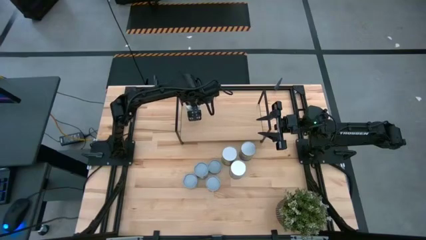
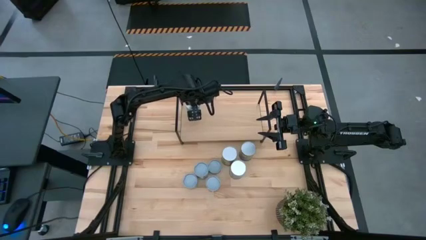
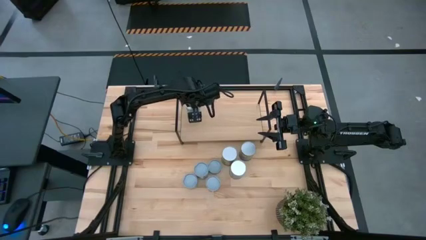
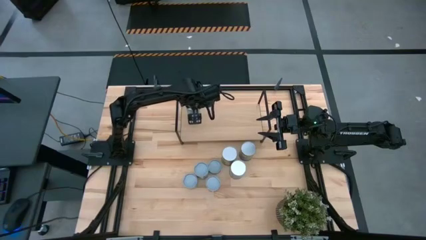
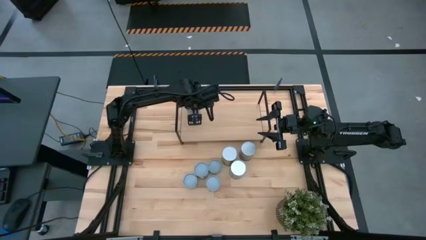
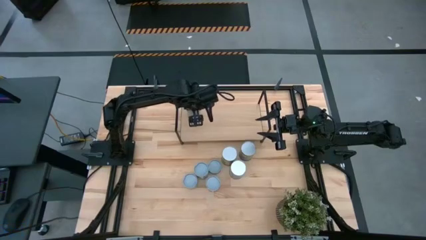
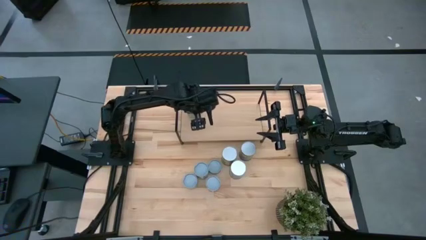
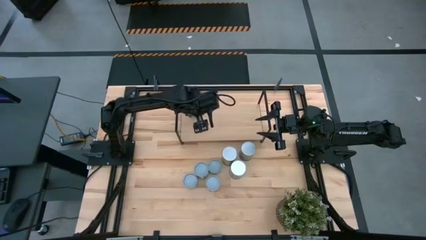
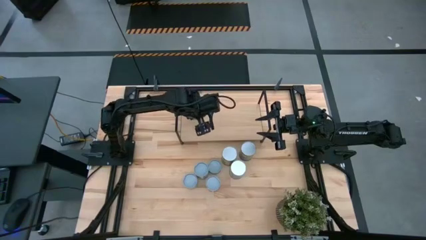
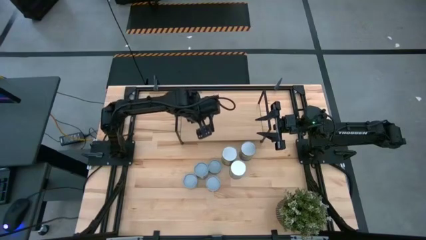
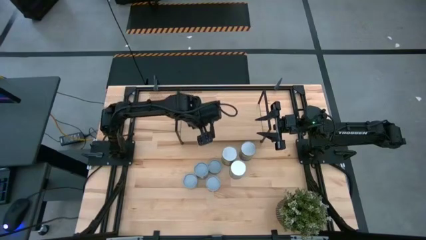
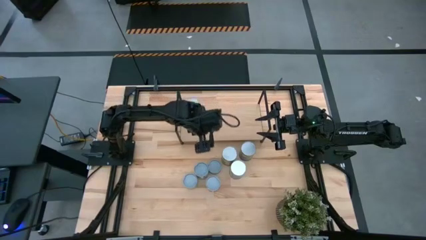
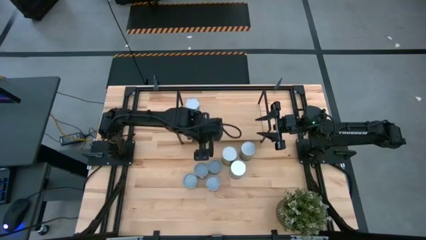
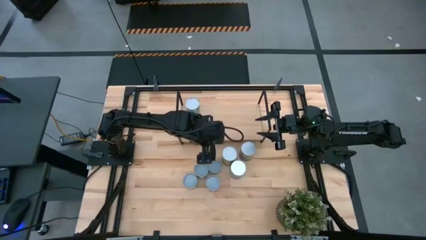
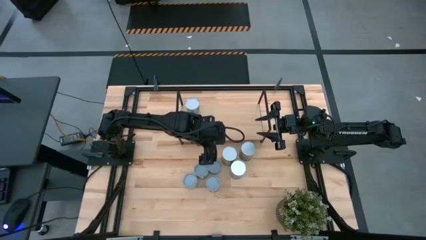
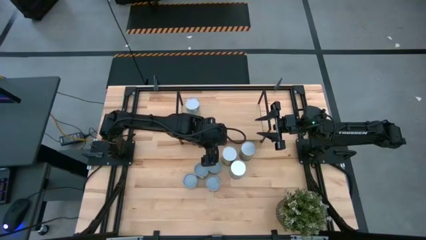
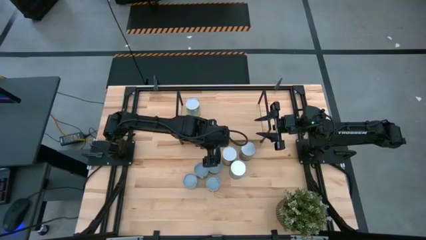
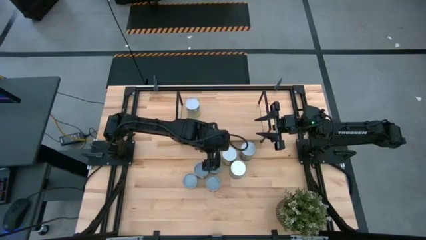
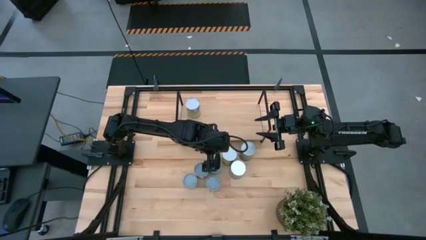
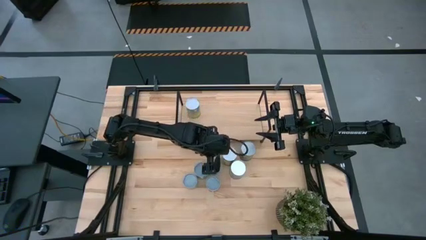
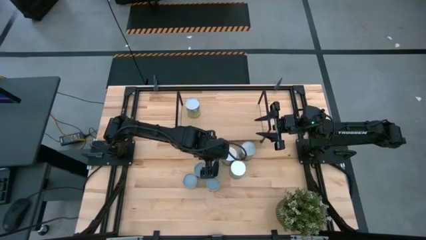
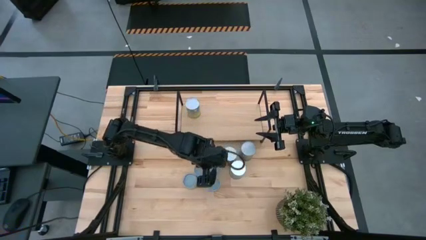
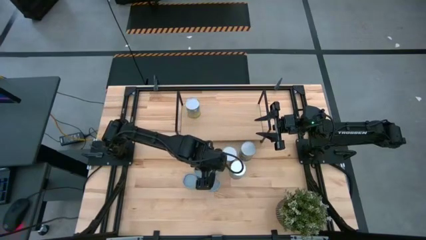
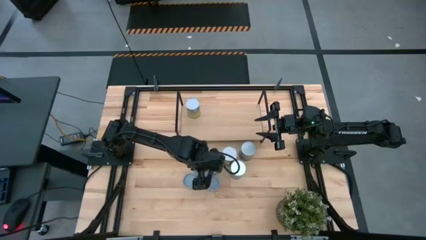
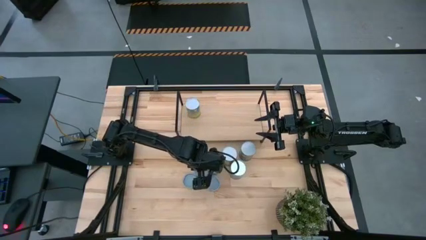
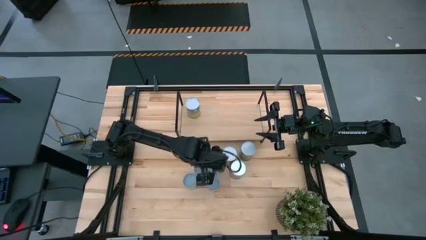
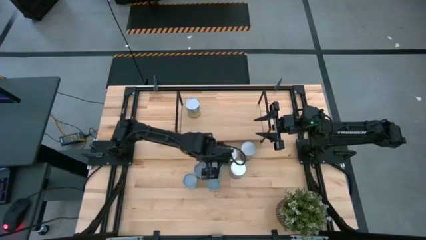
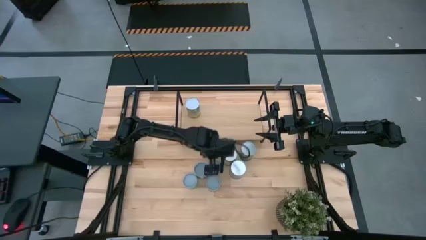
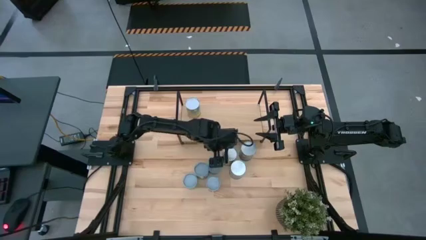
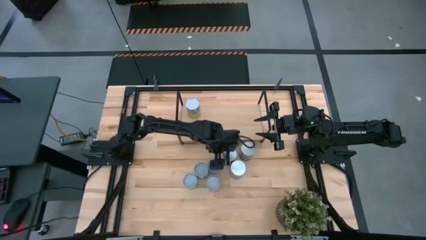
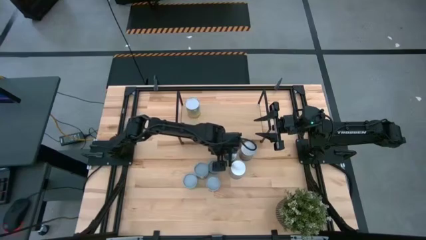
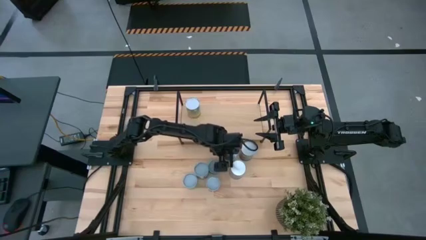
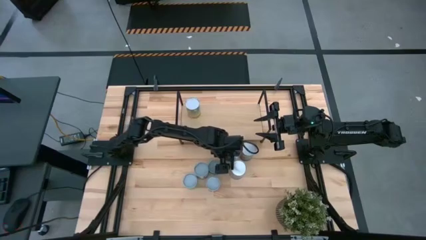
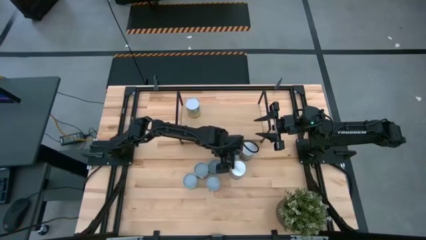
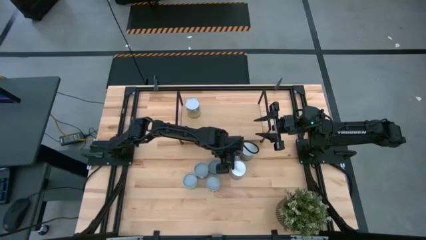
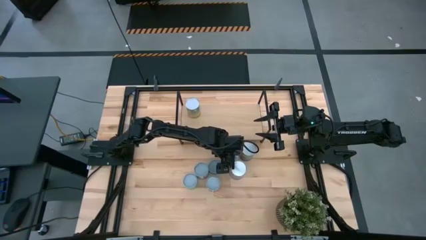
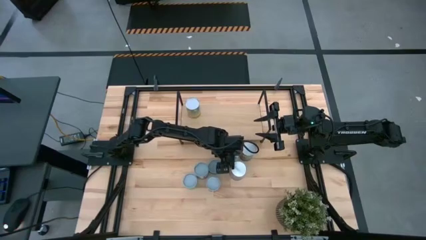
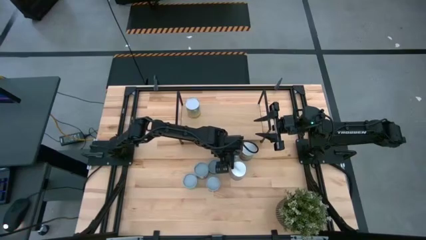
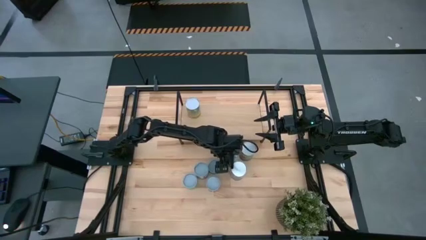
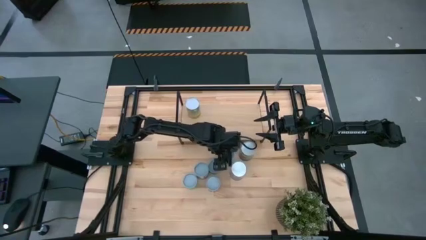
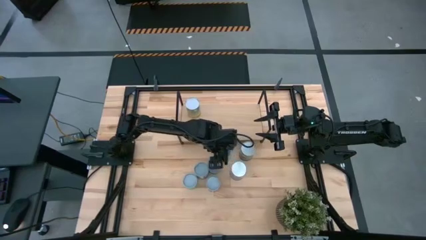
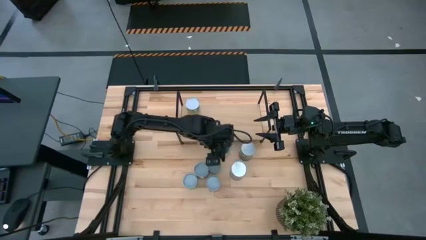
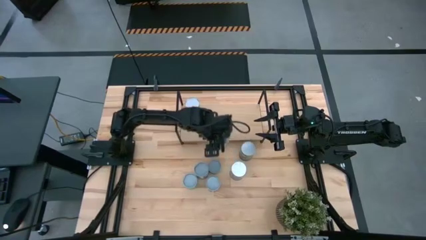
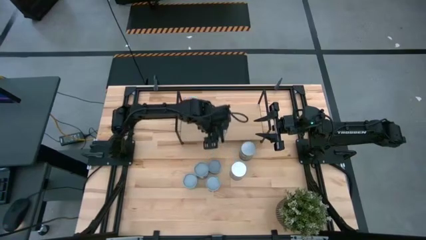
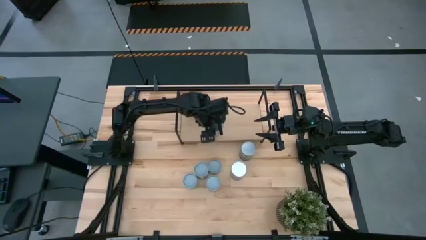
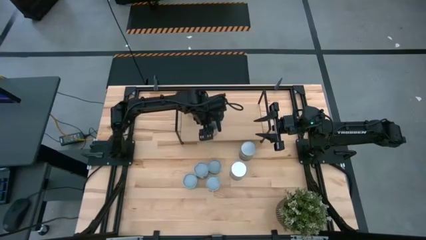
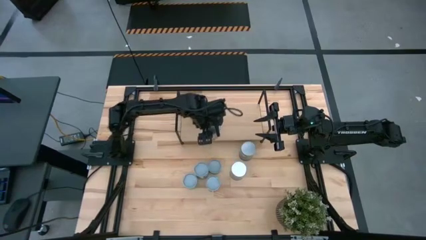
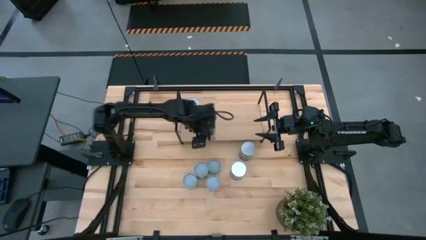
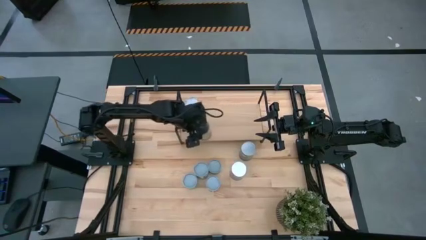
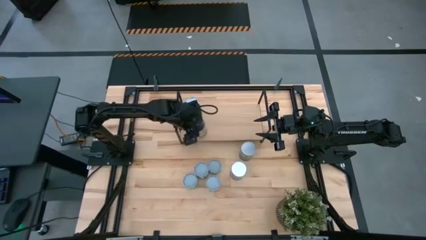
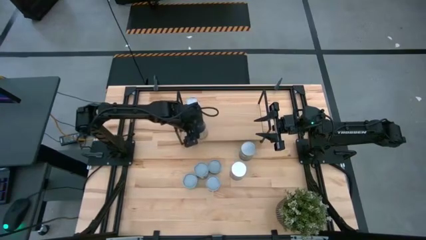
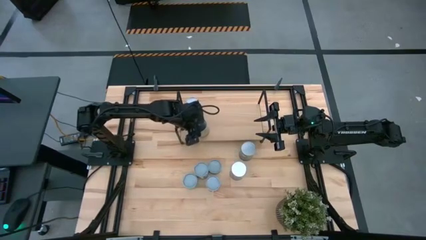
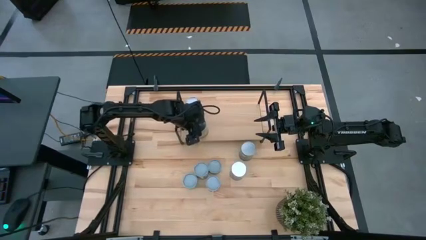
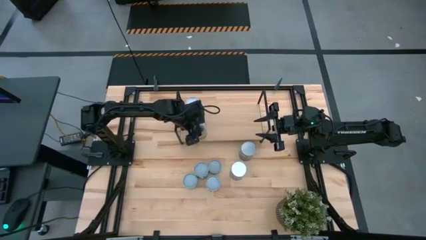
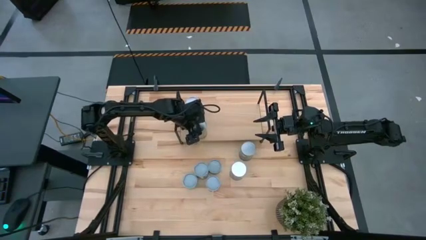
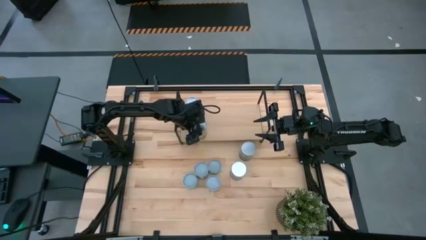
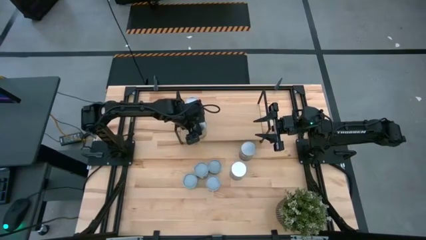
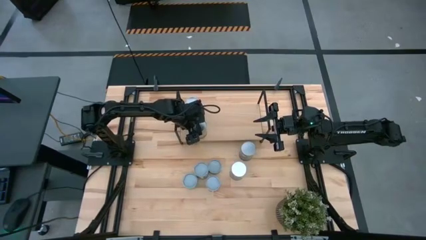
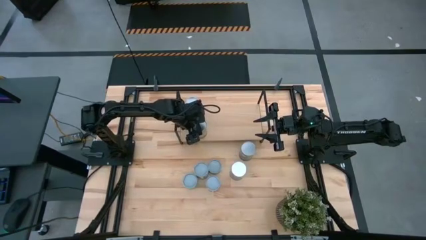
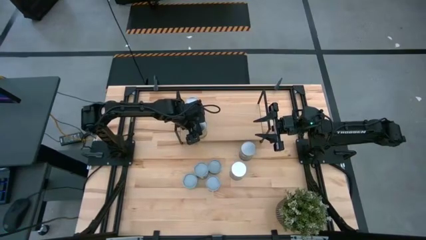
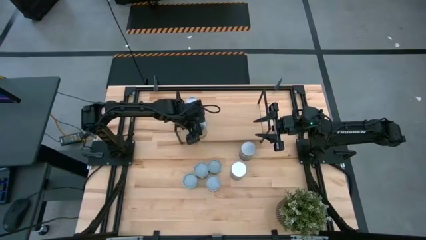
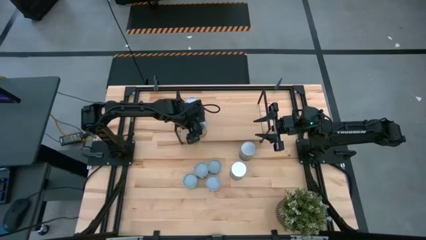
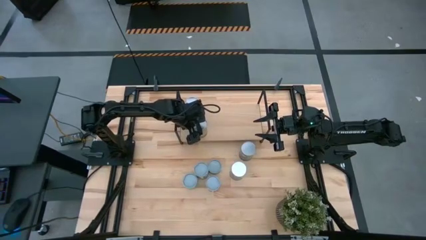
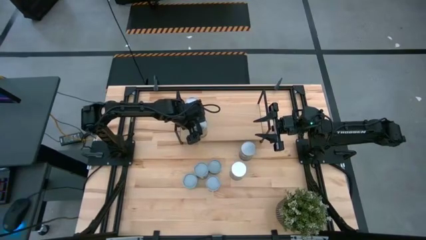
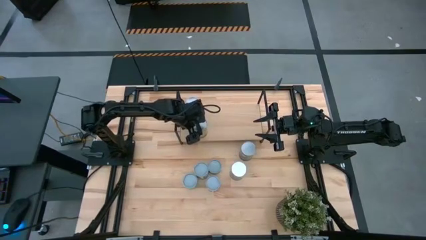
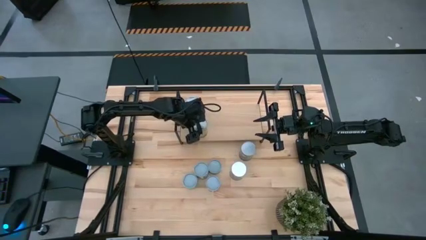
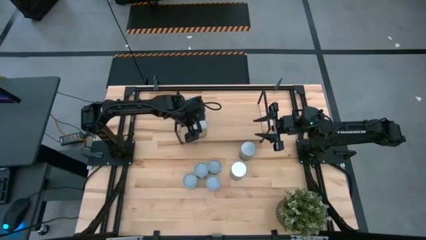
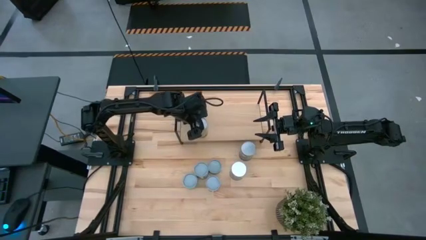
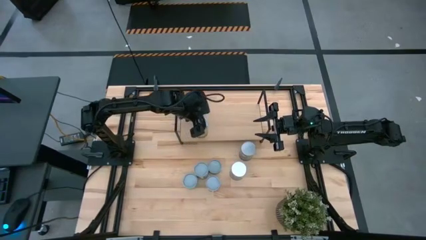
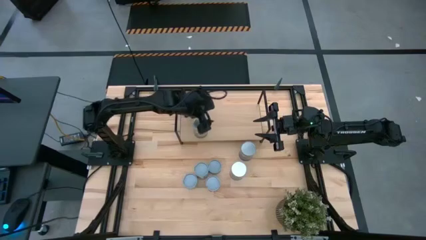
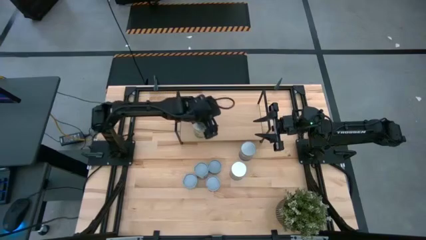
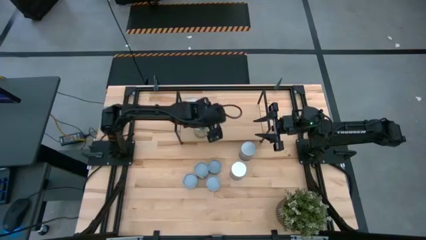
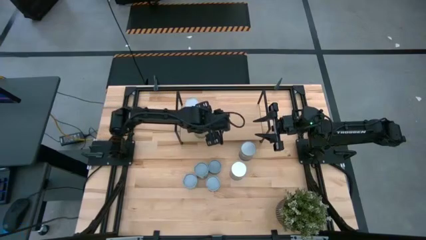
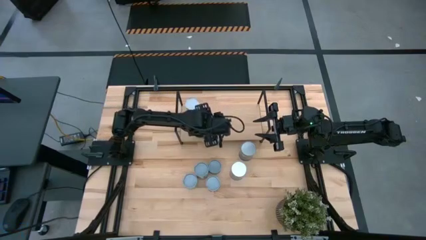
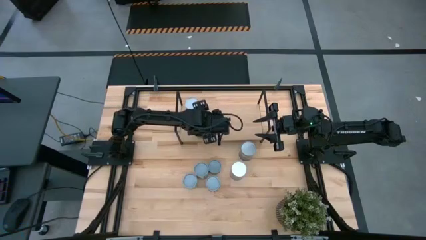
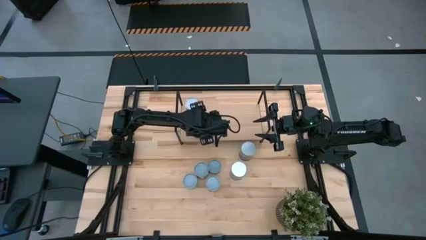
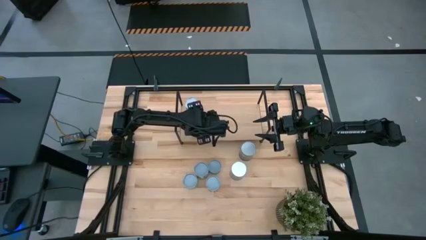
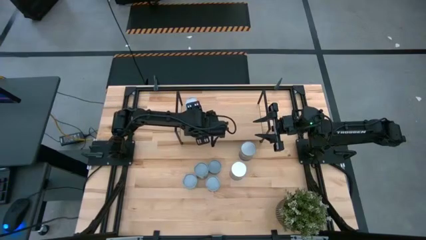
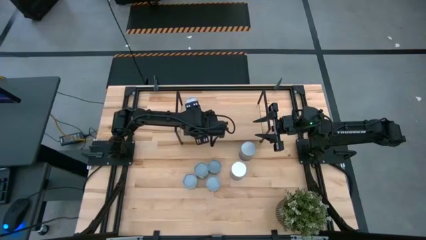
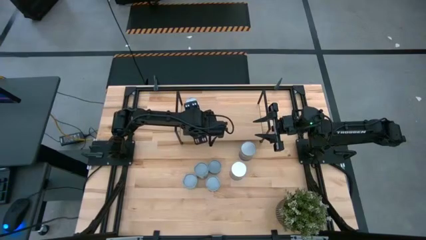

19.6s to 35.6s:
Task: Pick and place cans onto a shelf
Put the canned oranges on the shelf
